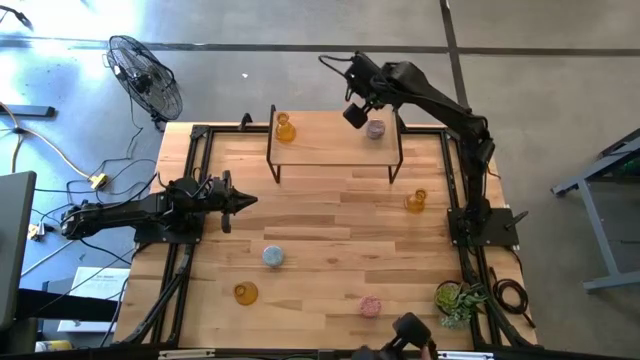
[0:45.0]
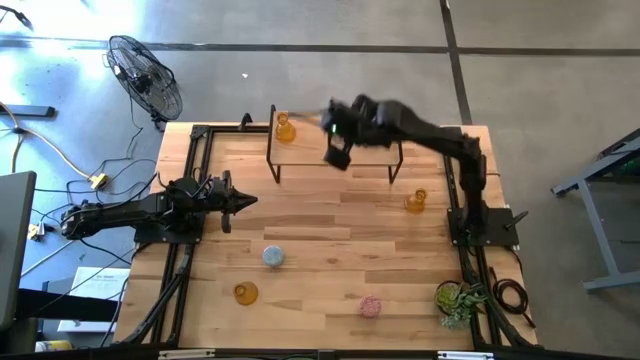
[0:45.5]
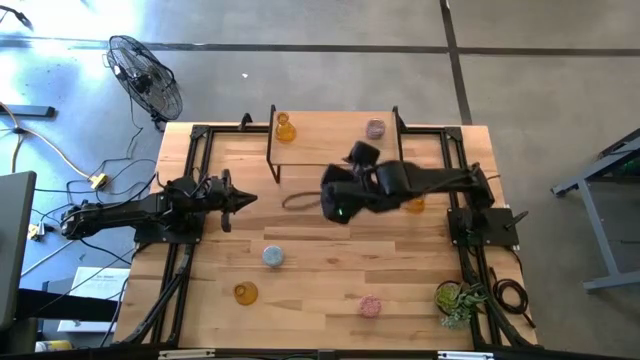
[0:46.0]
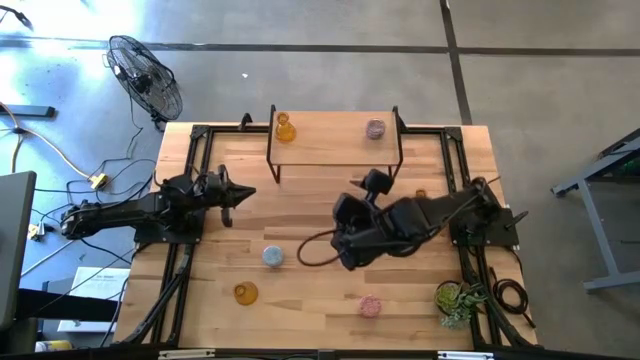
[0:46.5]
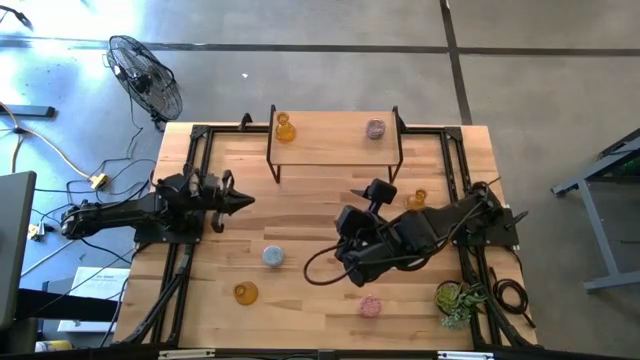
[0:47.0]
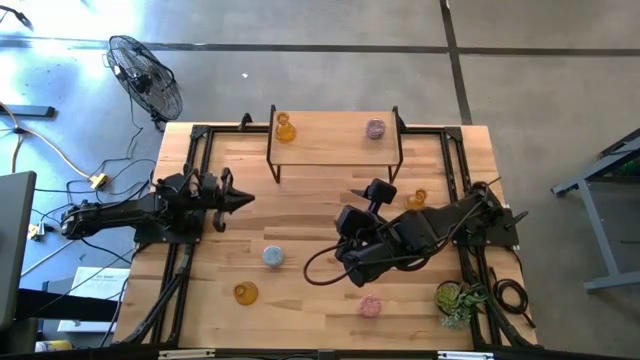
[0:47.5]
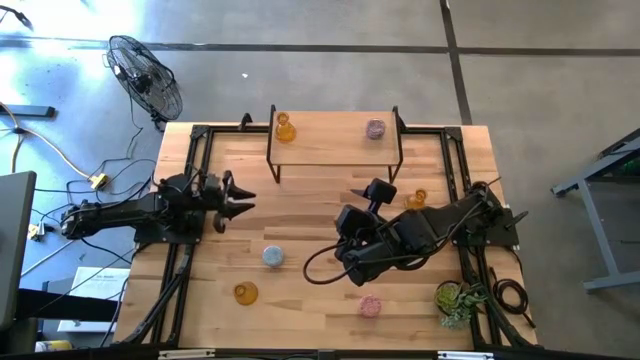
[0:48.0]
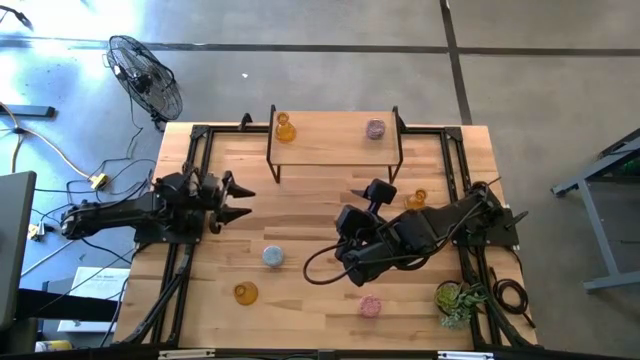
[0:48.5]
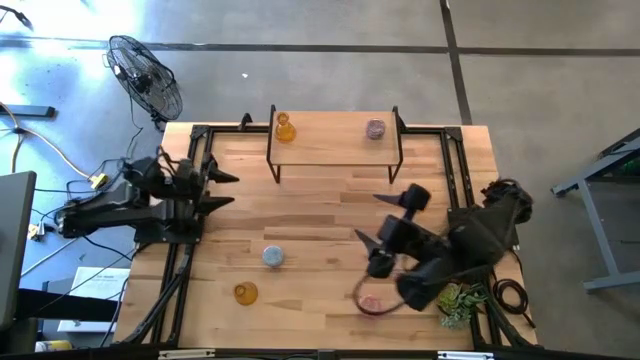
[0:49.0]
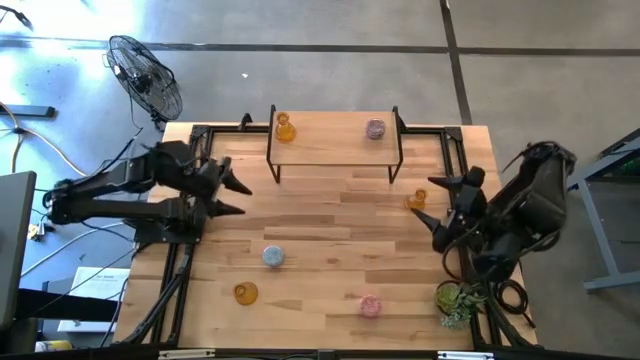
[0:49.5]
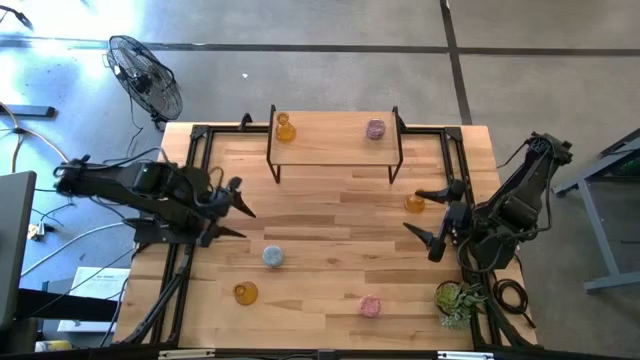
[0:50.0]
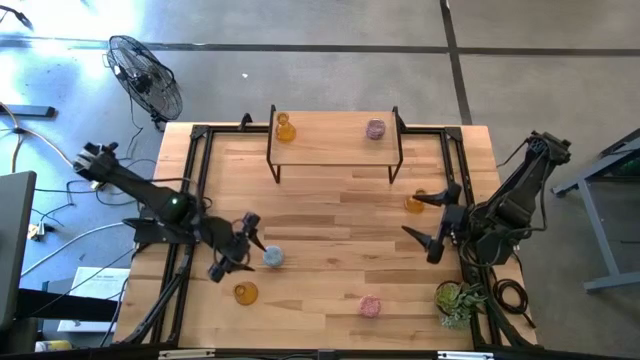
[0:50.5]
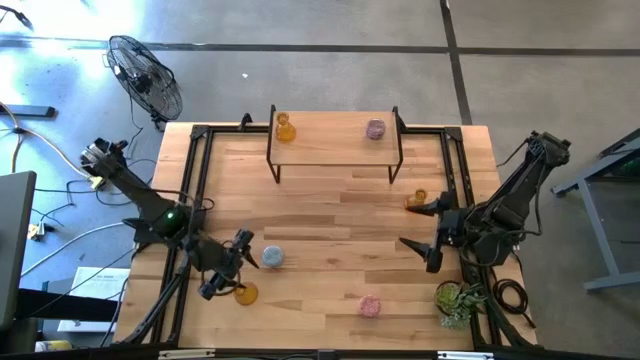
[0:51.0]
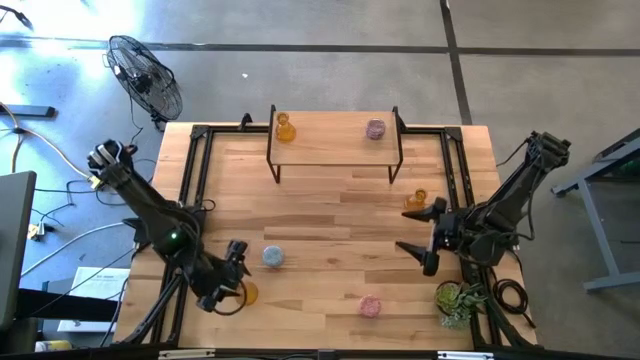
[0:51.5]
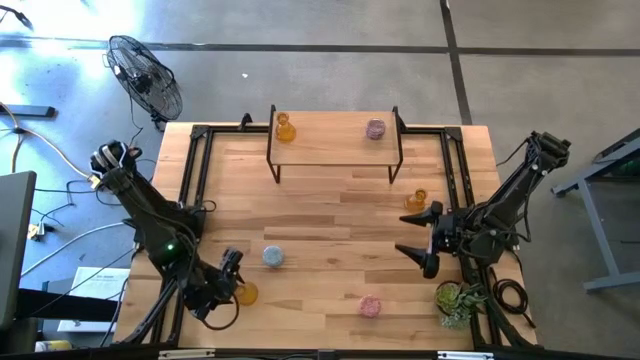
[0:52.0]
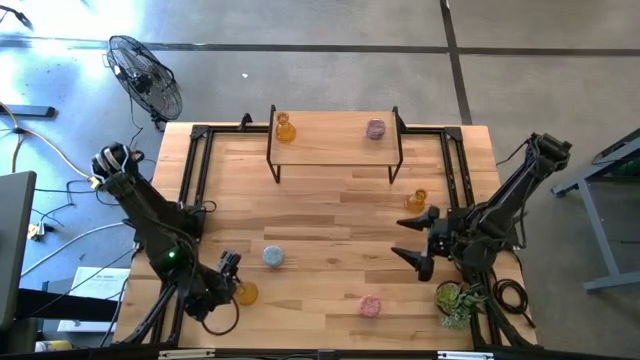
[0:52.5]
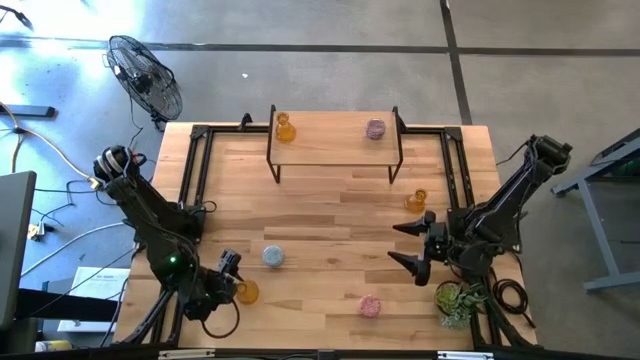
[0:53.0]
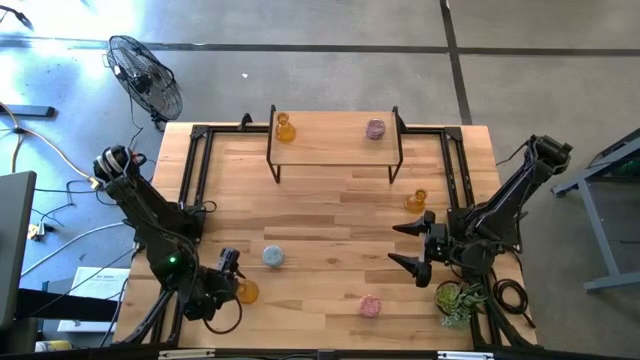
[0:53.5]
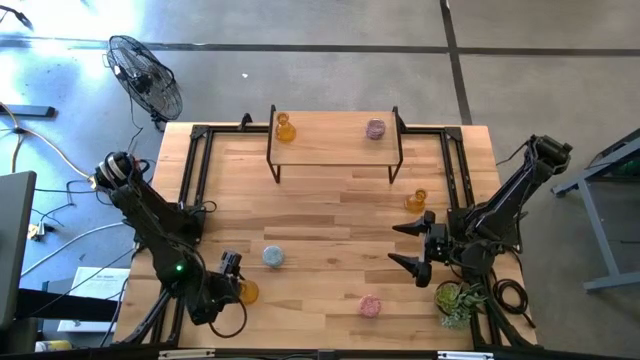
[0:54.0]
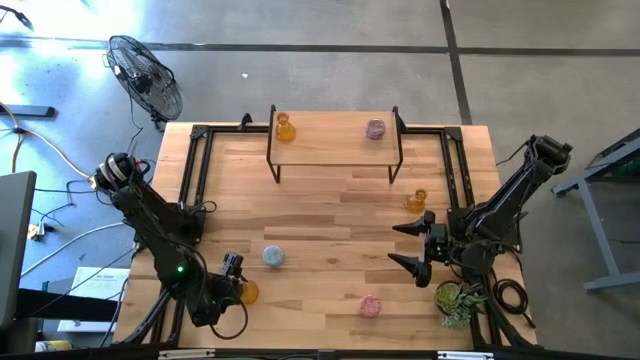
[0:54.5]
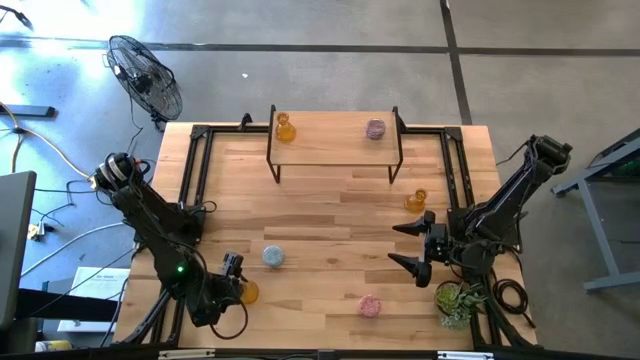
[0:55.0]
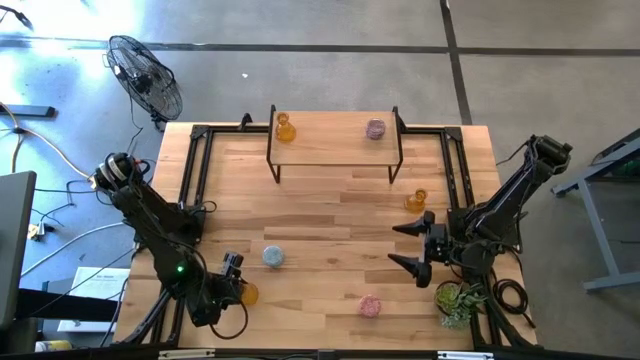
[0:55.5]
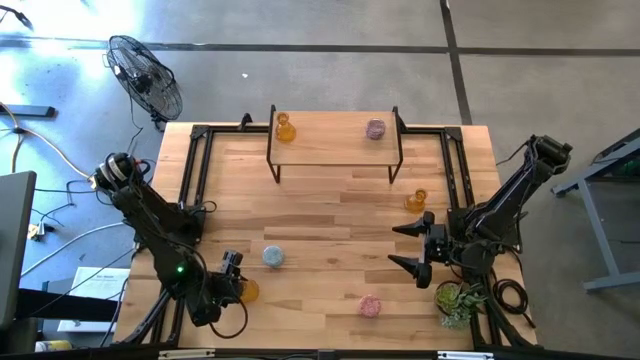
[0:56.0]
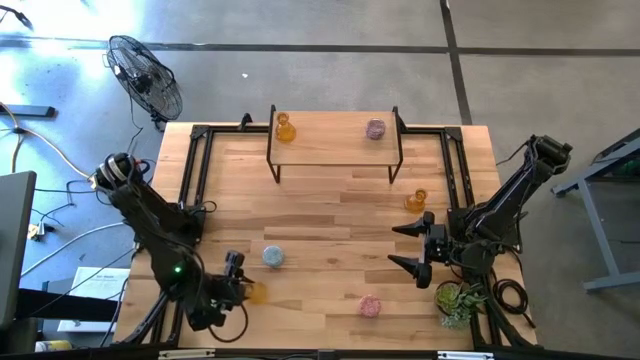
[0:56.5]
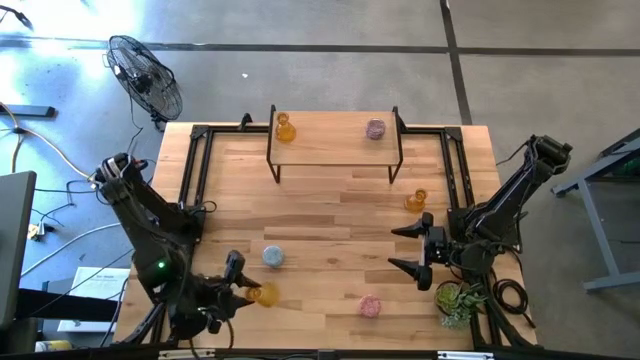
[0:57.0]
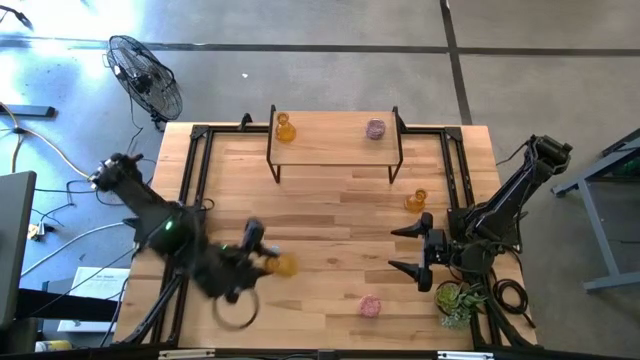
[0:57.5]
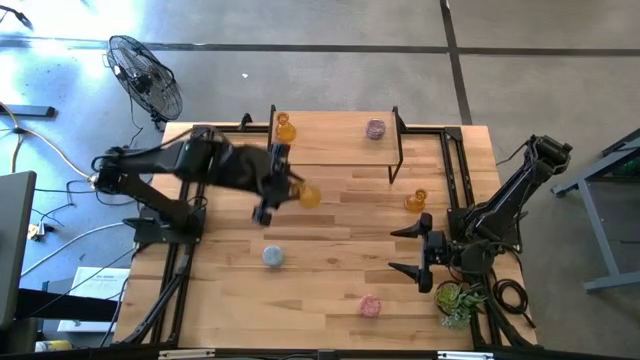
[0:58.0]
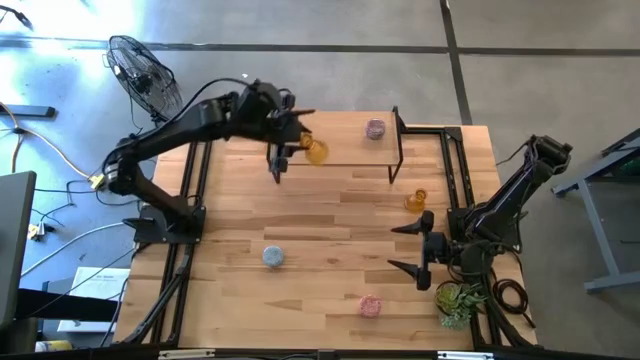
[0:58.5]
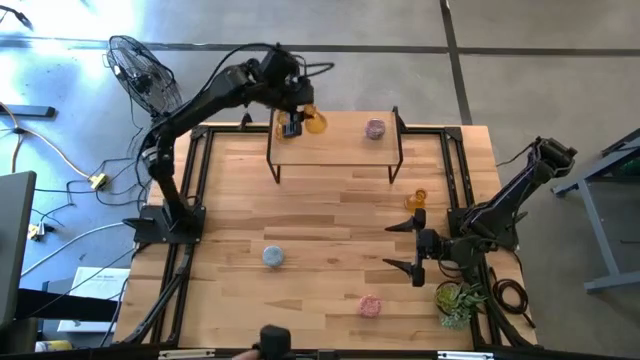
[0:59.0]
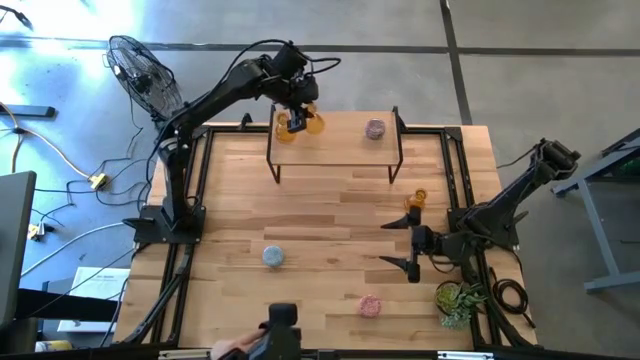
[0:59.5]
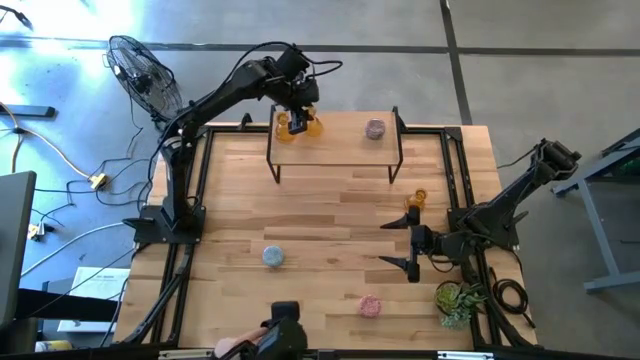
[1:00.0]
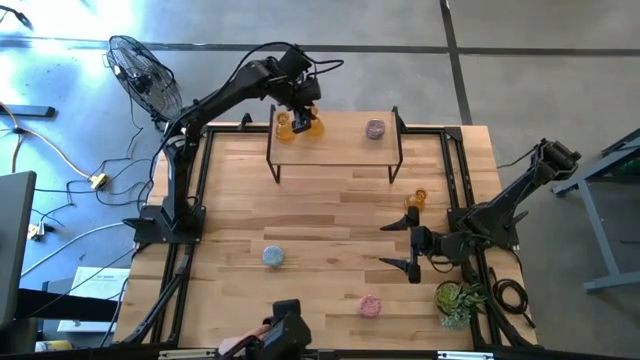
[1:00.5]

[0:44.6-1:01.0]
Task: Pick & Place candle stick holders
Put the bottom orange candle holder on the shelf

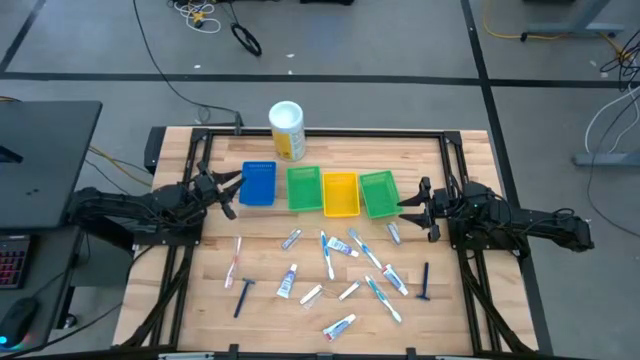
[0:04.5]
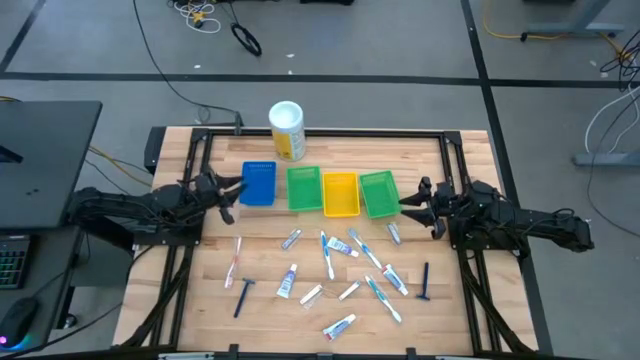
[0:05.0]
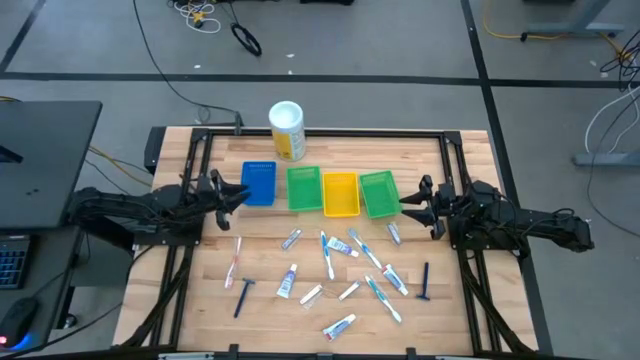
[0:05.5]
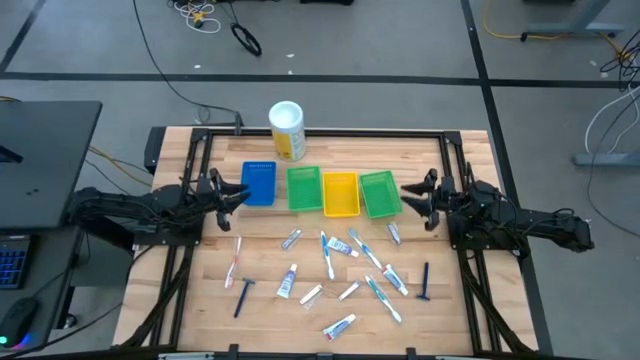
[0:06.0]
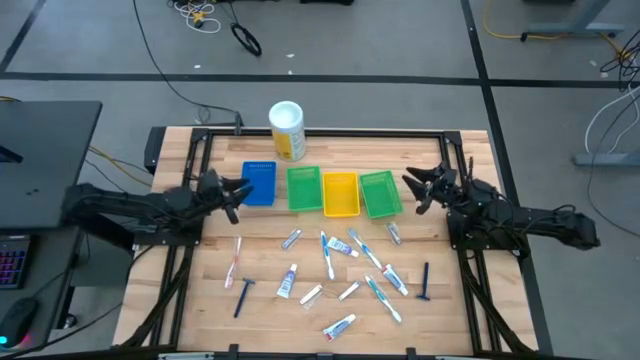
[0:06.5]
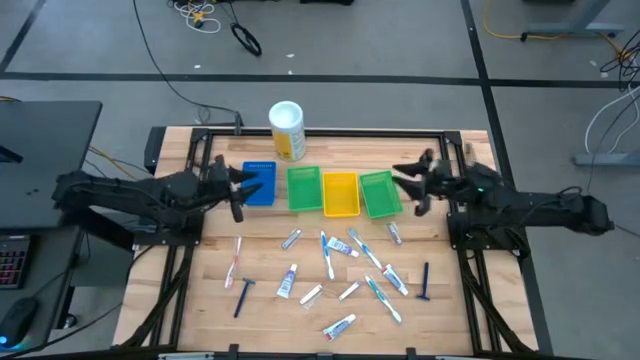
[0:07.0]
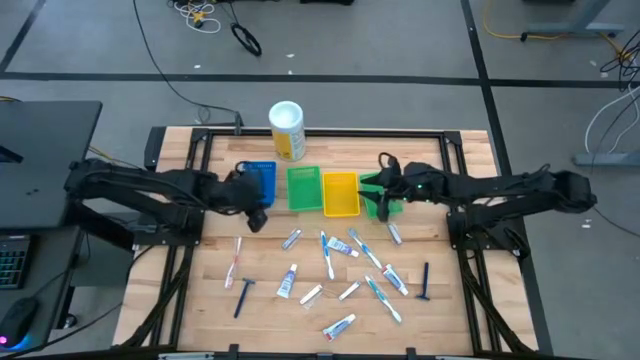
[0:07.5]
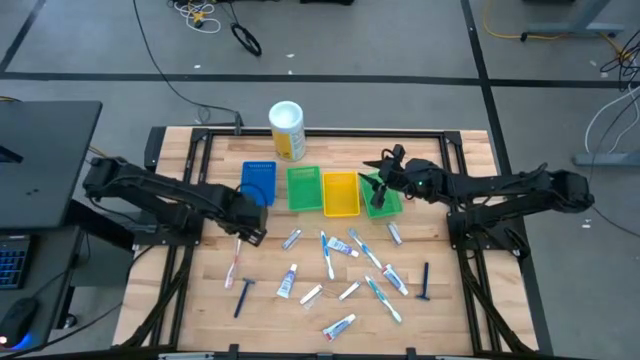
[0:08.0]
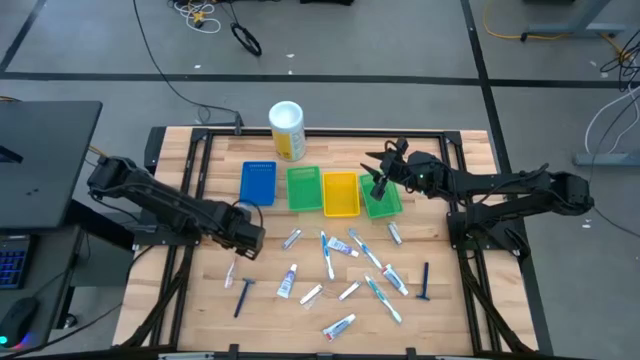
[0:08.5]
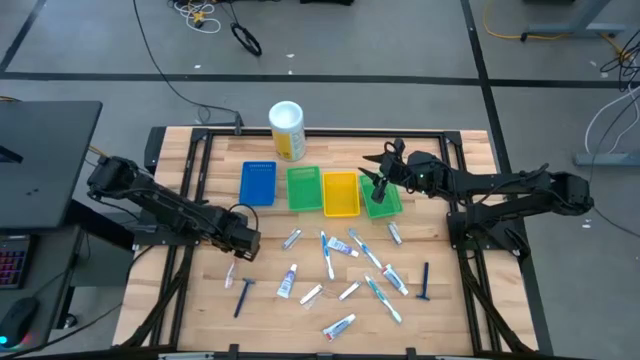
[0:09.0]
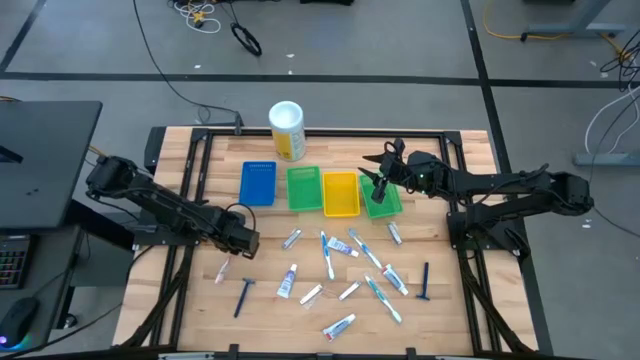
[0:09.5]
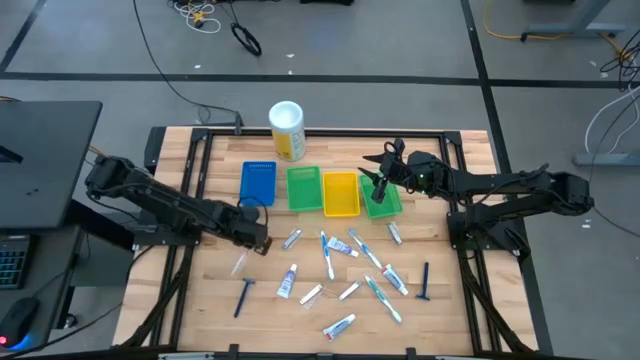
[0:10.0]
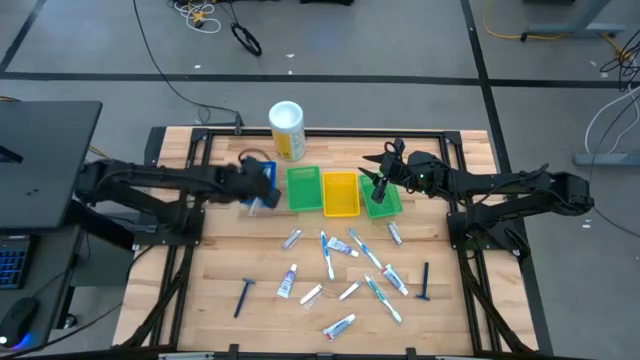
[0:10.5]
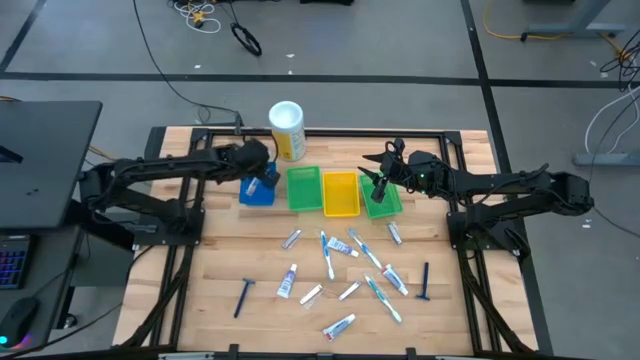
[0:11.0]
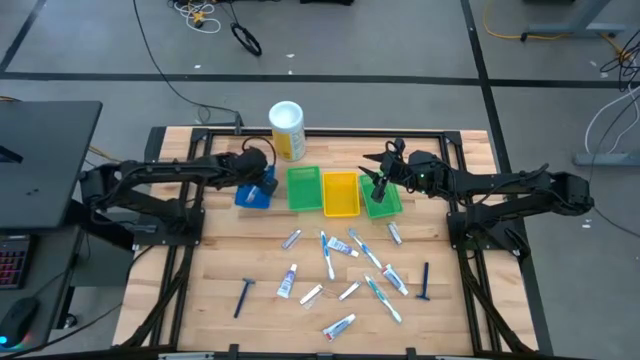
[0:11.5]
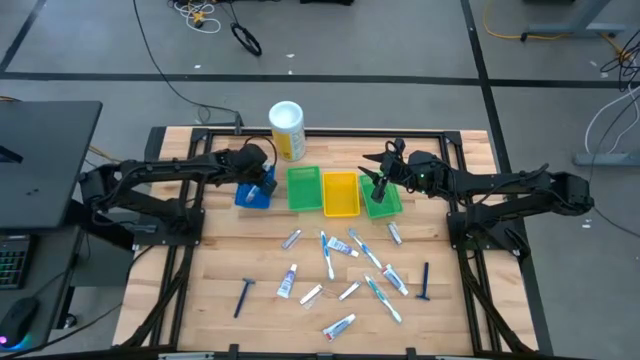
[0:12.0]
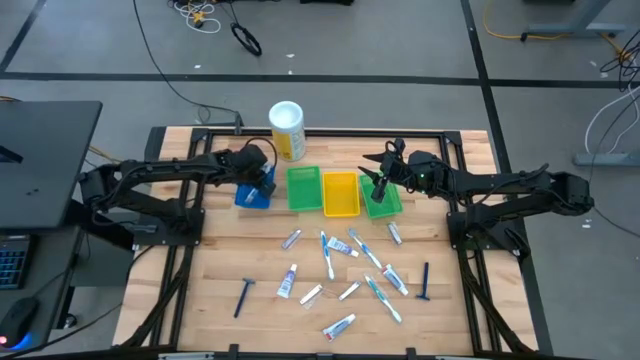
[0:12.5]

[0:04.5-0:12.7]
Task: Pick & Place Travel size toiletries
Put the red toothbrush into the blue bin
